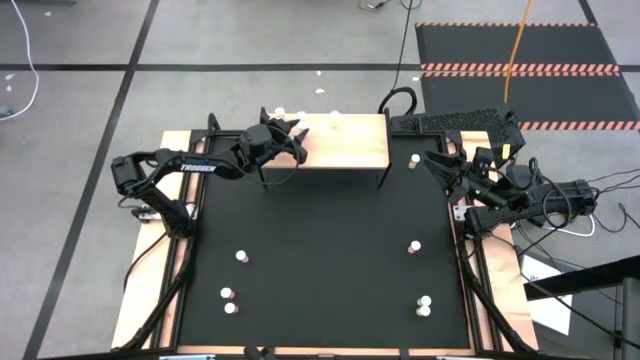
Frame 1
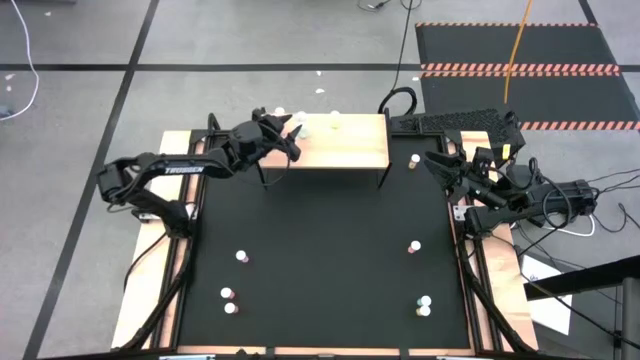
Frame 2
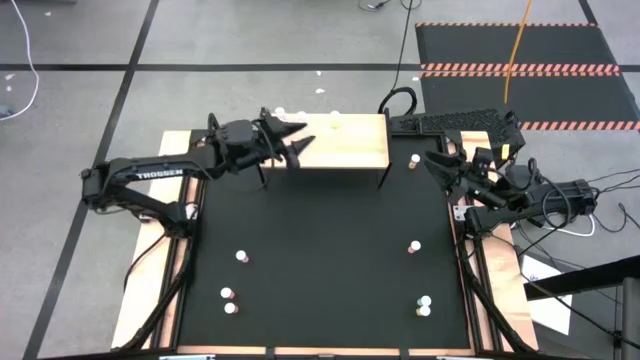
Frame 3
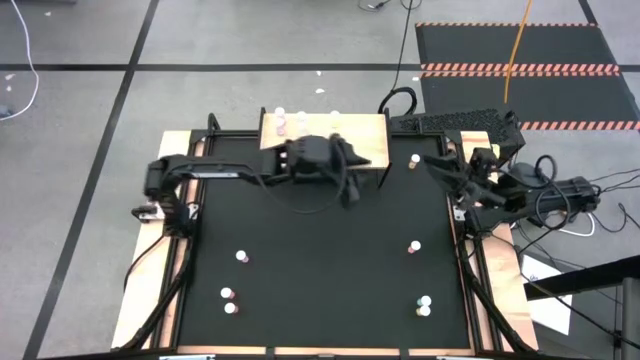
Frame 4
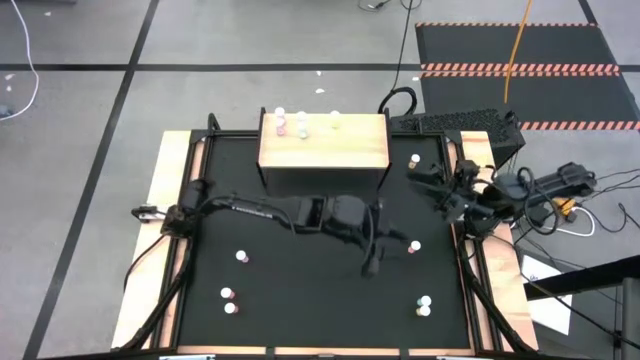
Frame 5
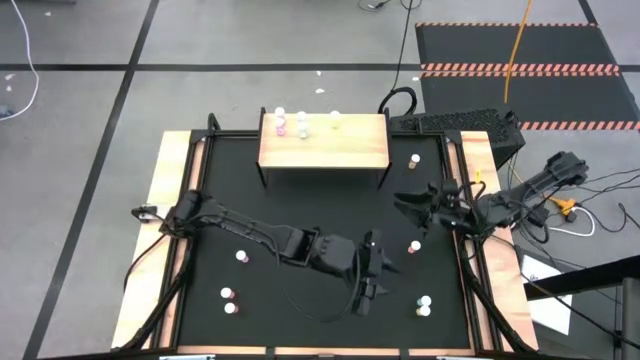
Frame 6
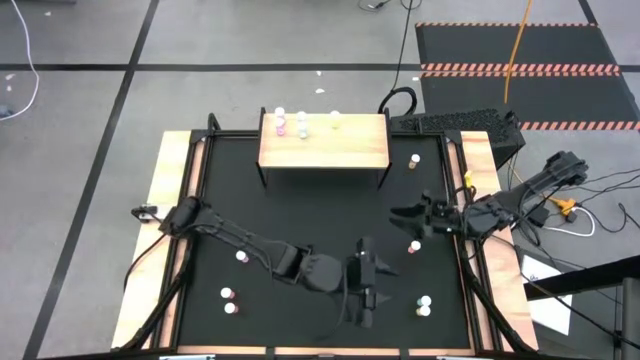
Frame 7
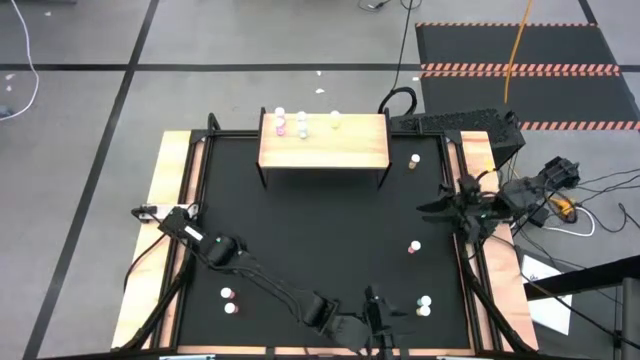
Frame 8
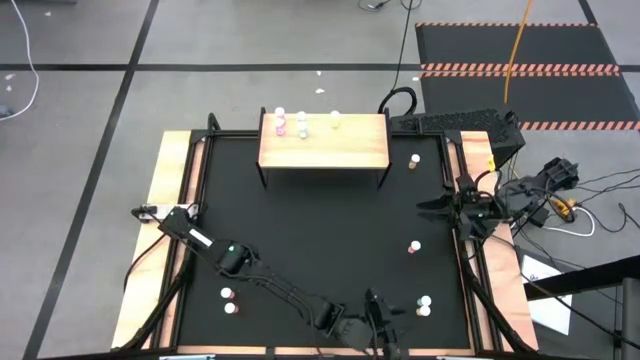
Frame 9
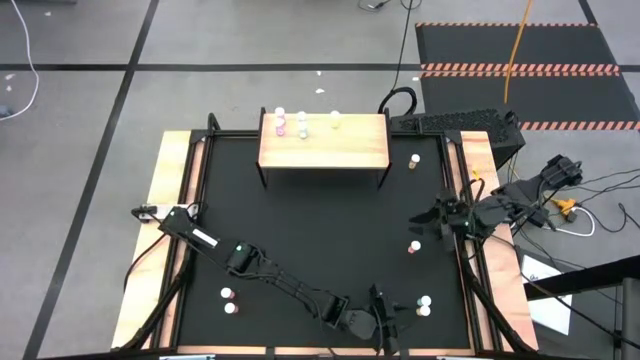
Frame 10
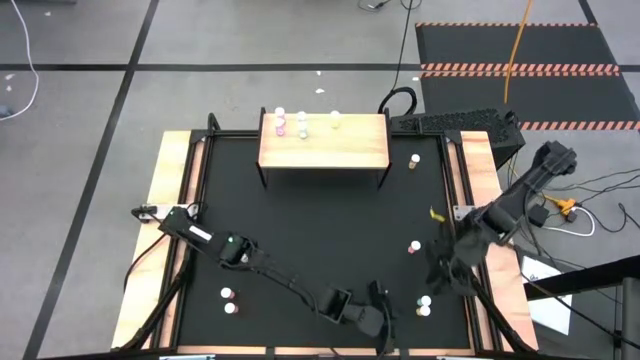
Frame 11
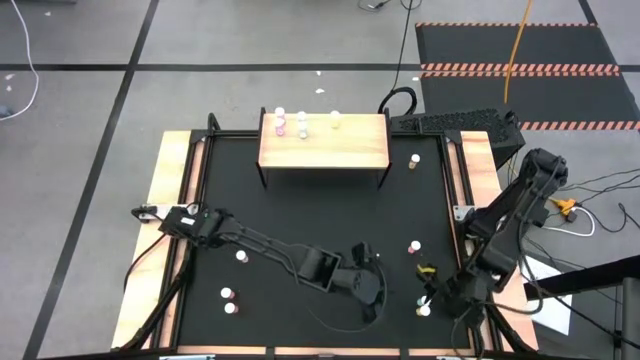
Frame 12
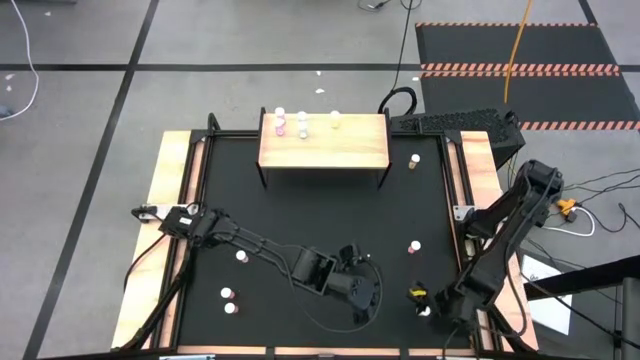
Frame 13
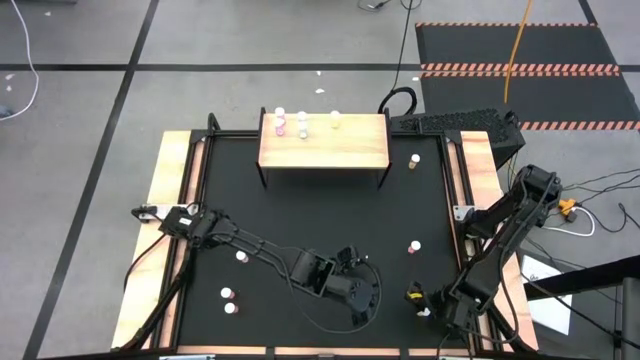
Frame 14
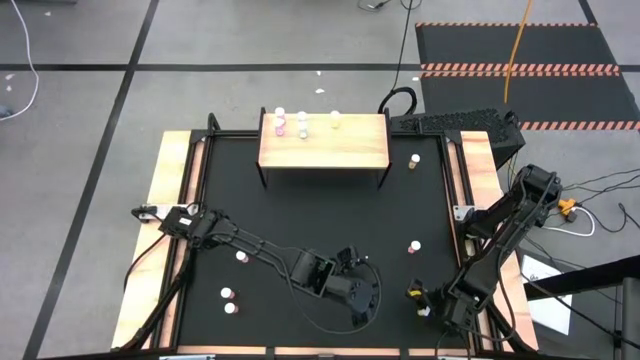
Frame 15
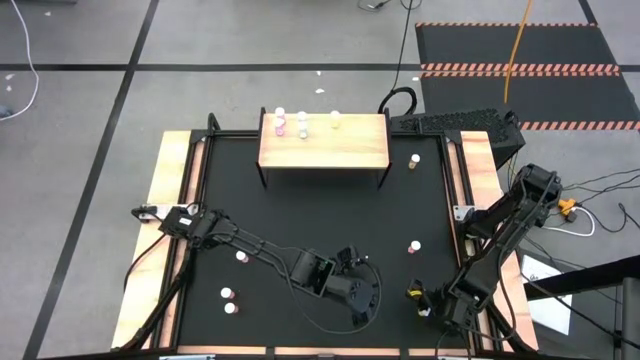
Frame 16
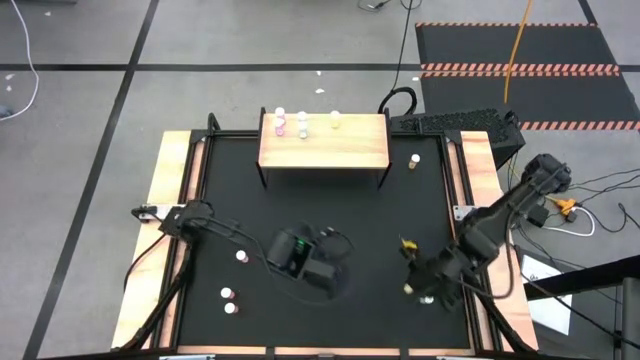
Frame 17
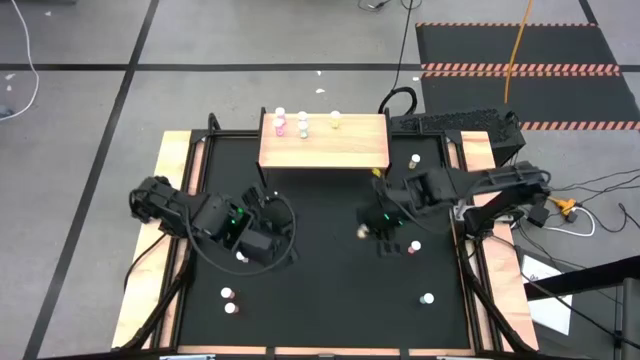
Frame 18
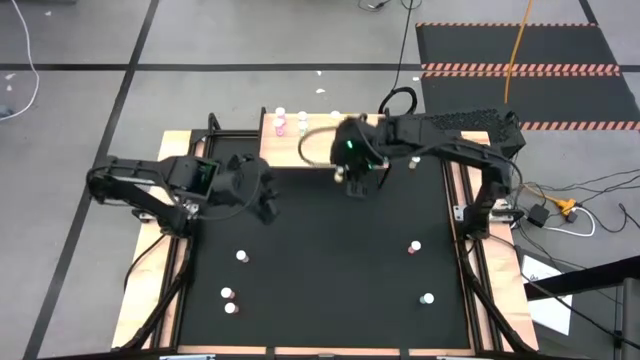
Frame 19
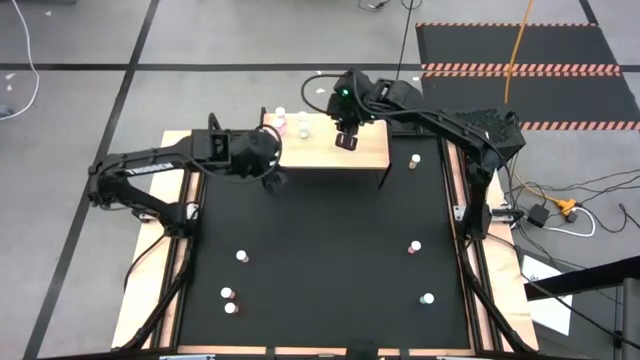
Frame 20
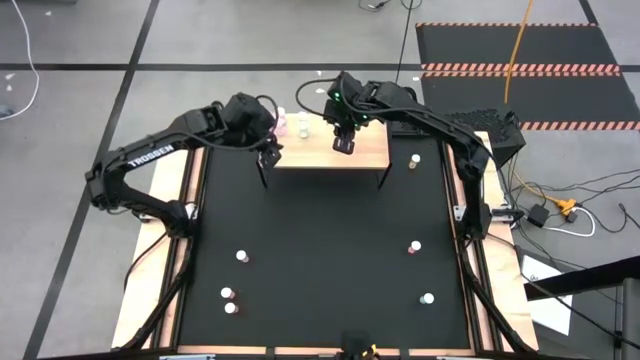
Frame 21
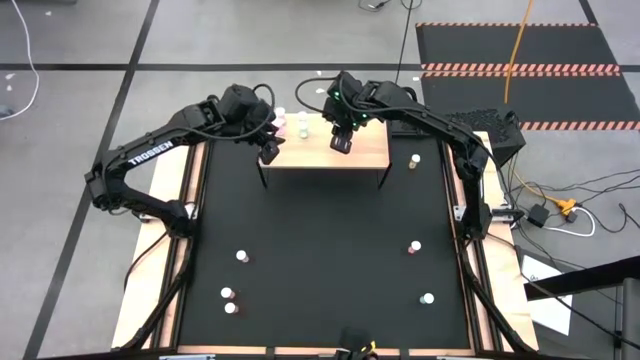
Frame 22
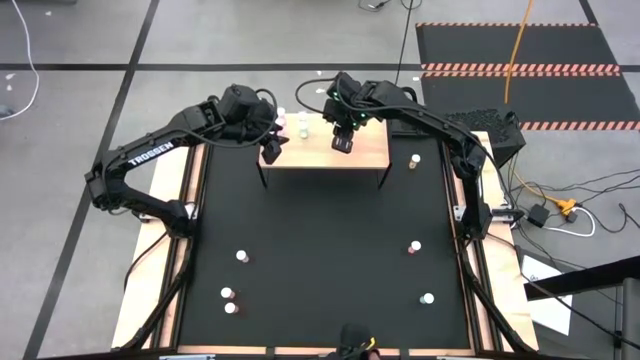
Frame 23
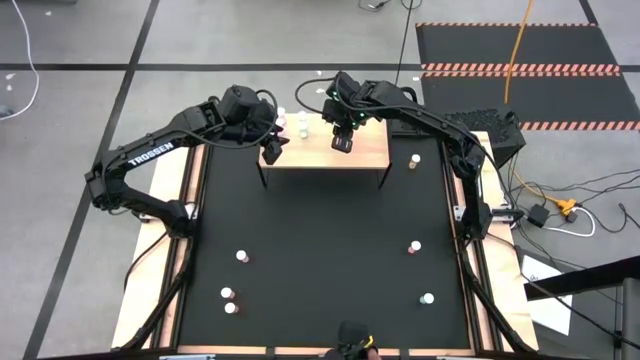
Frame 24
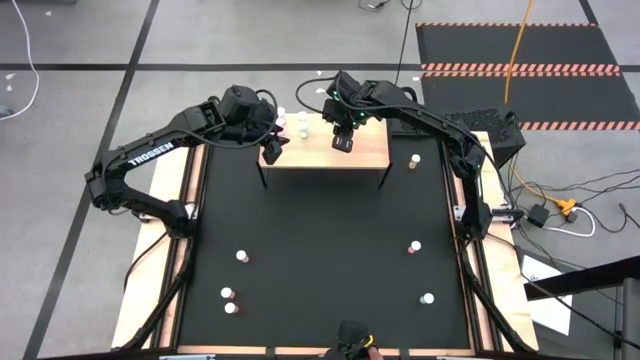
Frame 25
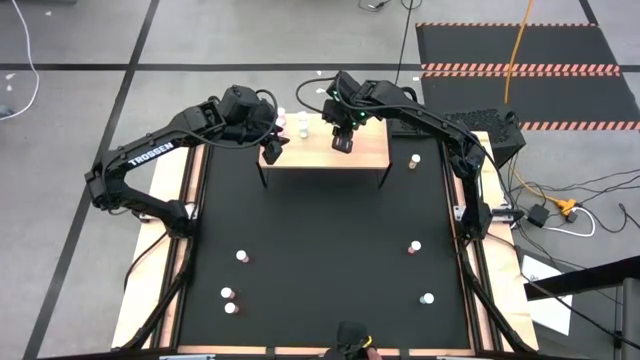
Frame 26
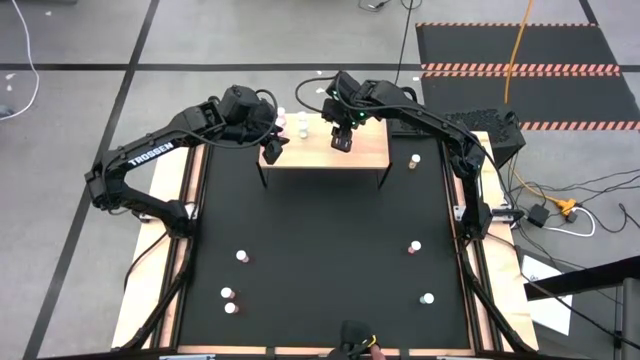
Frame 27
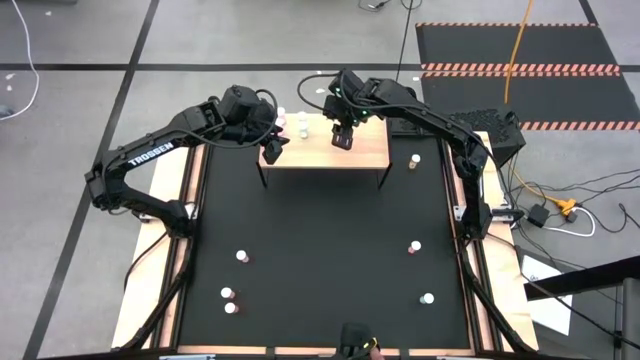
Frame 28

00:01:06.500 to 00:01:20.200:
Task: Pick and place medicine bottles onto shelf by color
Put the bottom yellow pill bottle on the shelf aligned with the other yellow pill bottle

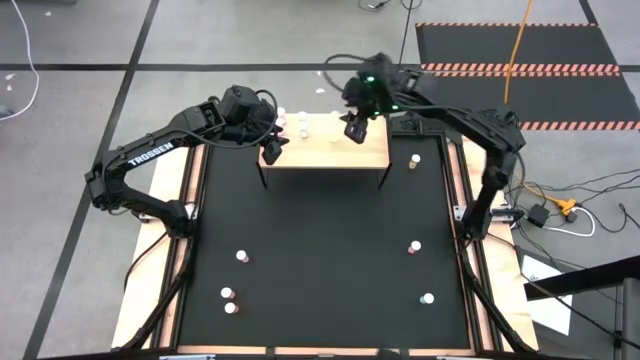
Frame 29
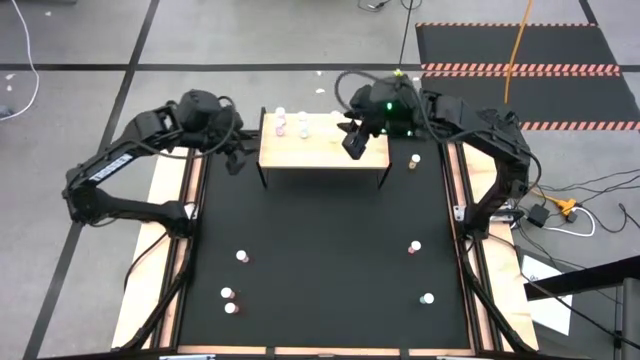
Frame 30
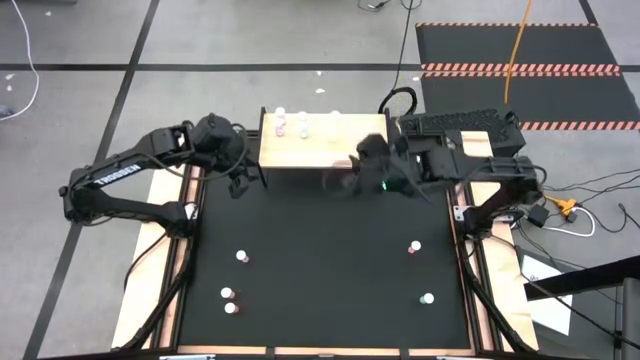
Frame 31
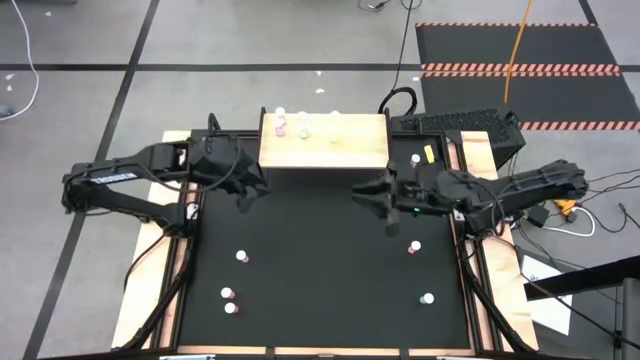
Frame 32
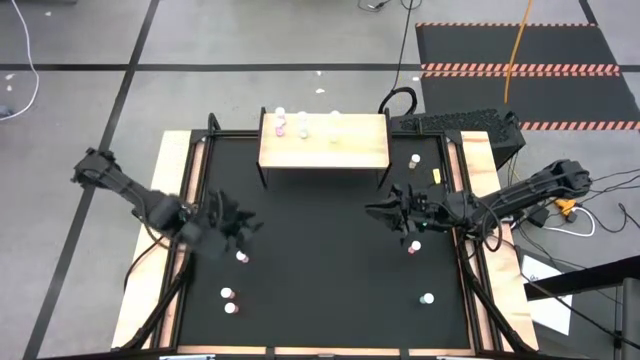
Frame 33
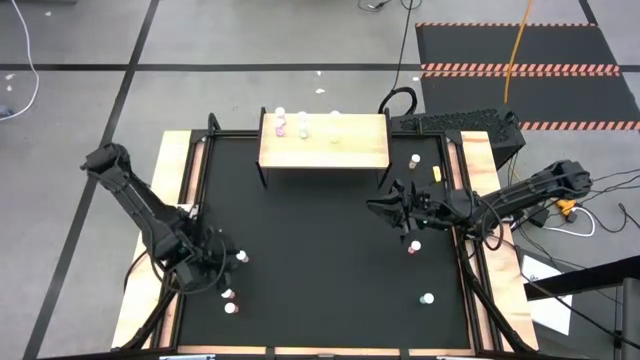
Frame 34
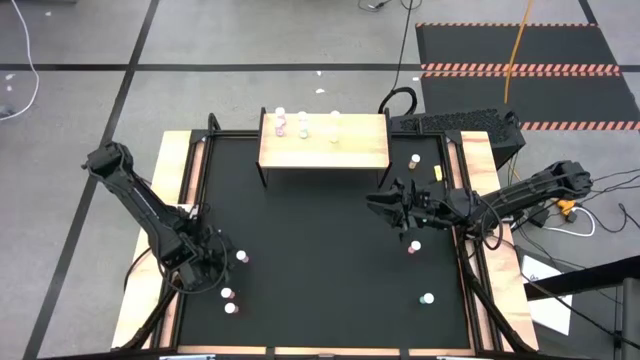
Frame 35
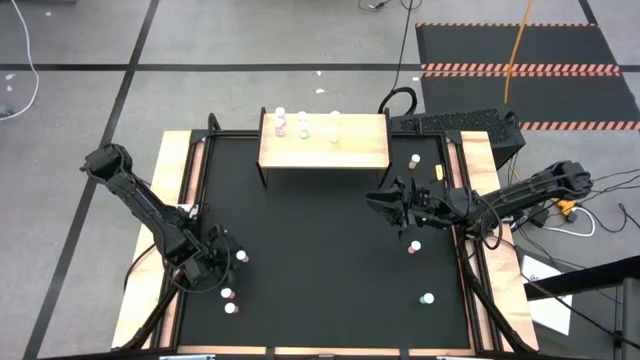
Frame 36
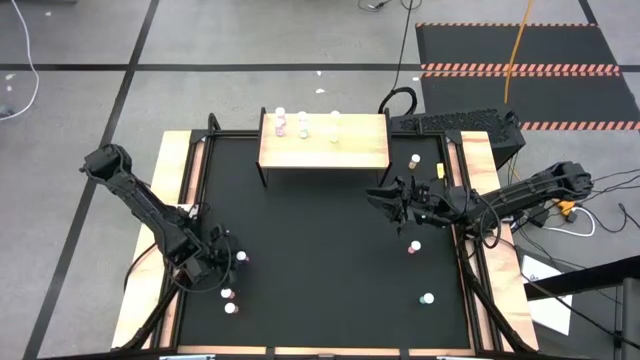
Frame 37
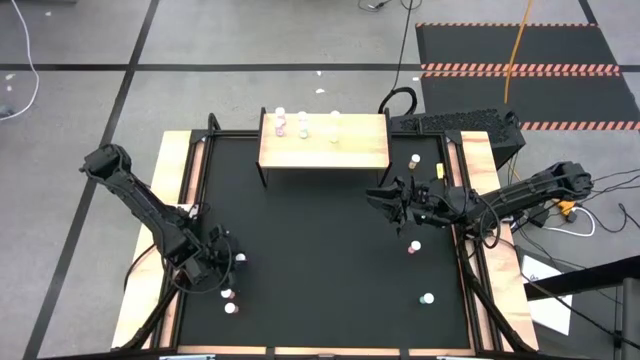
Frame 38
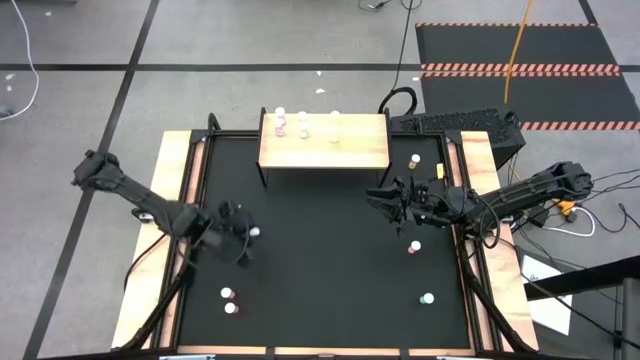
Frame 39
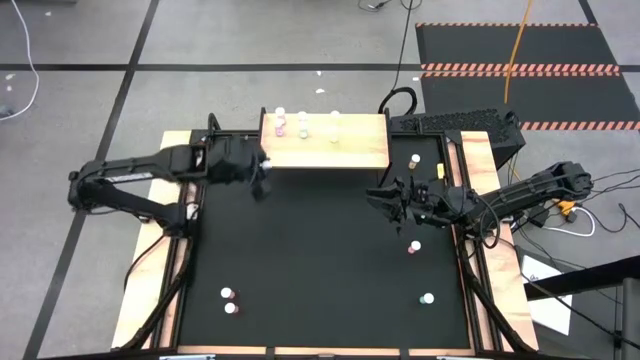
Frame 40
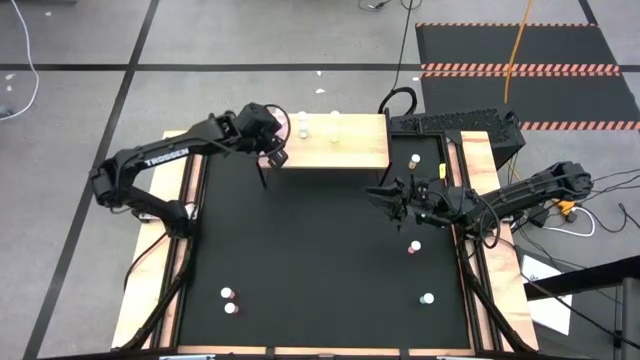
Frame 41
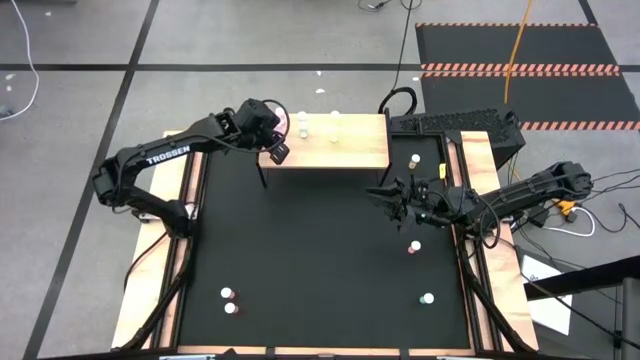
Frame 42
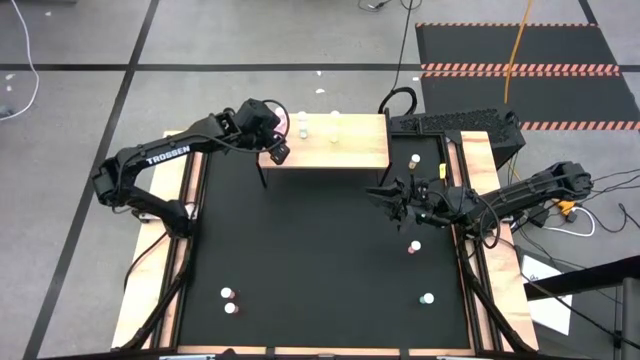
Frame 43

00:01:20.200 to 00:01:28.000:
Put the violet pill bottle on the shelf aligned with the other violet pill bottles
